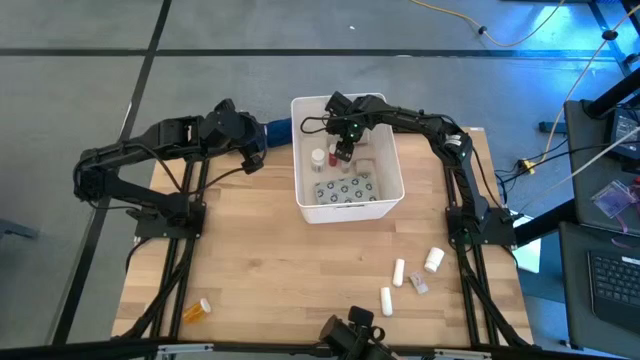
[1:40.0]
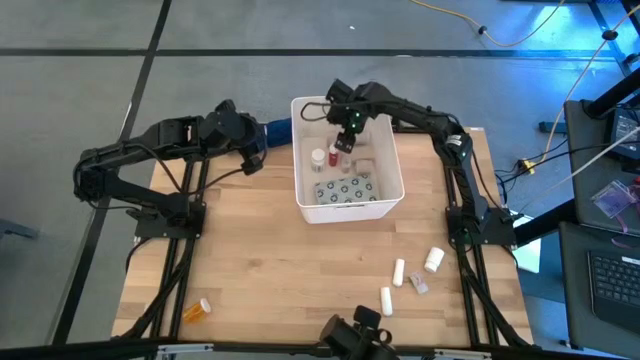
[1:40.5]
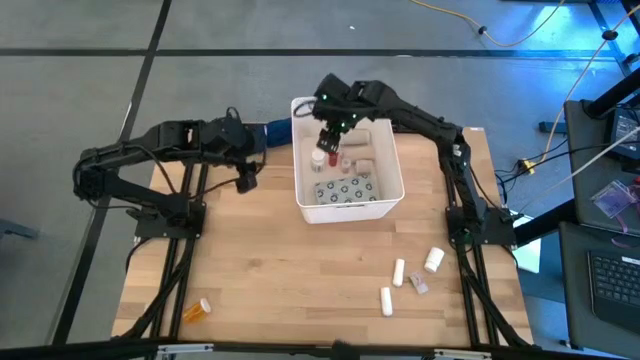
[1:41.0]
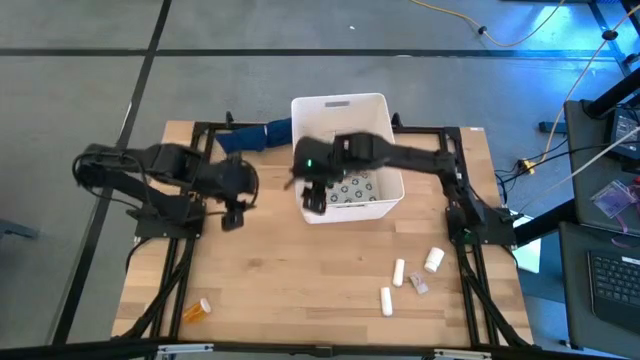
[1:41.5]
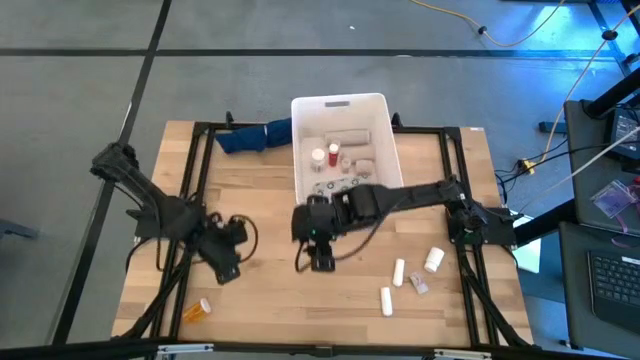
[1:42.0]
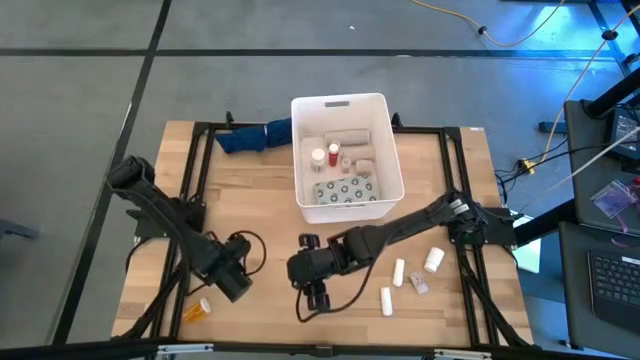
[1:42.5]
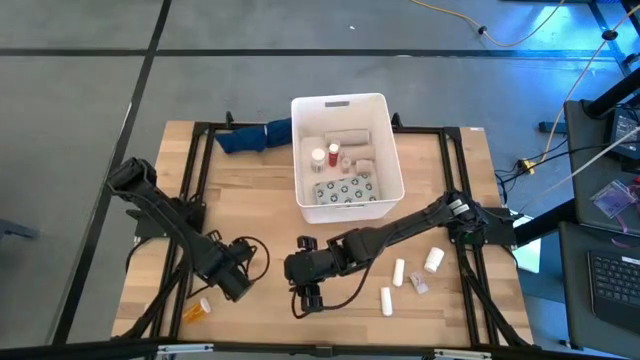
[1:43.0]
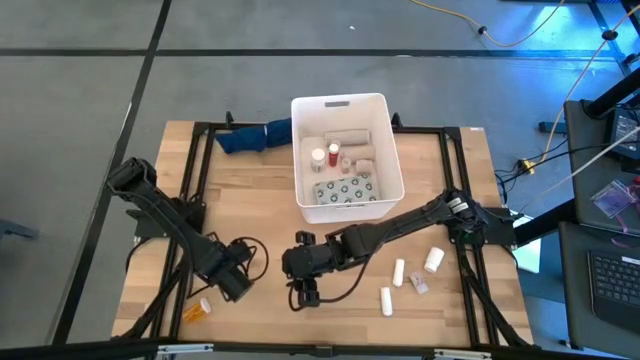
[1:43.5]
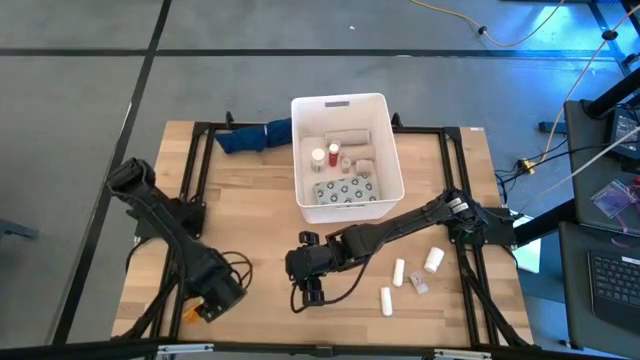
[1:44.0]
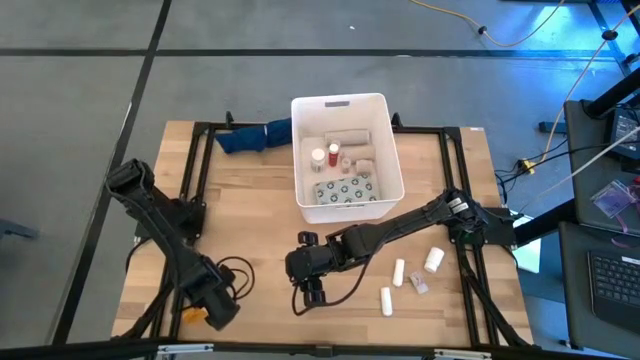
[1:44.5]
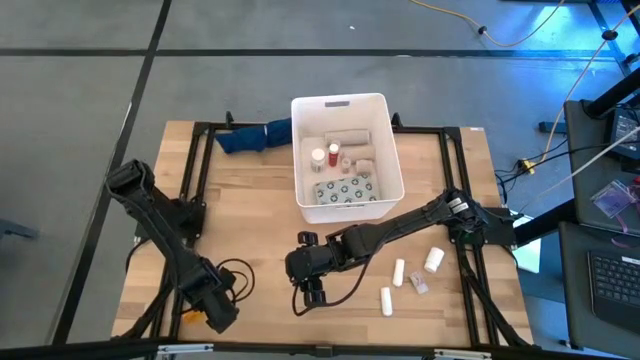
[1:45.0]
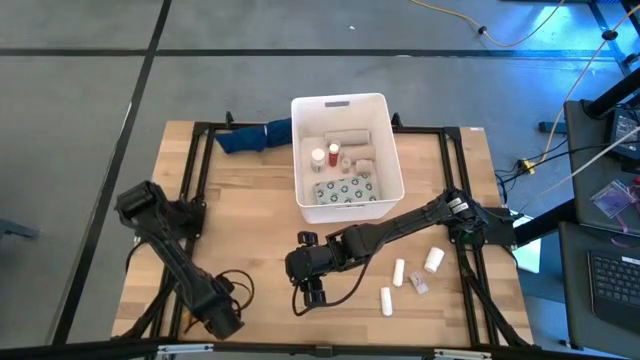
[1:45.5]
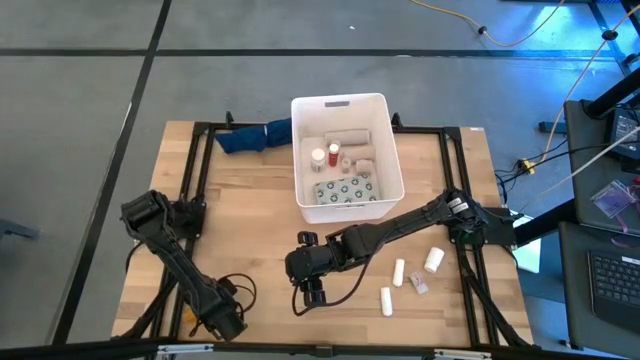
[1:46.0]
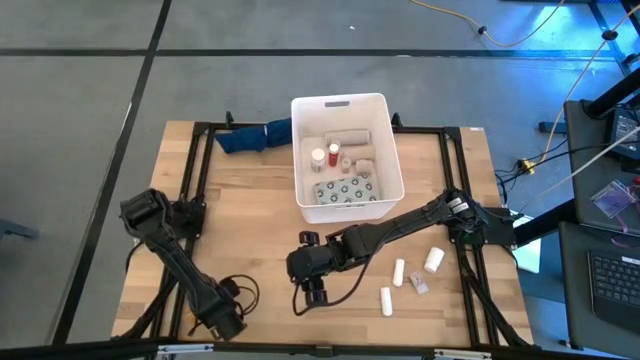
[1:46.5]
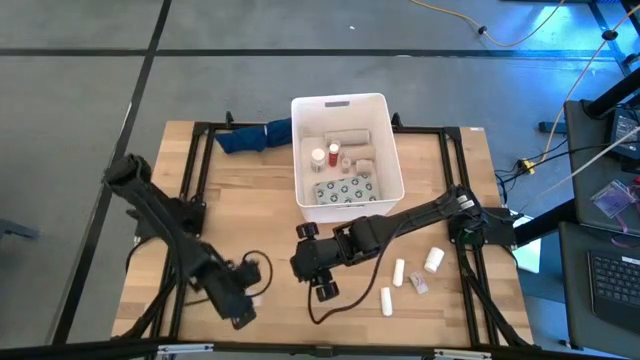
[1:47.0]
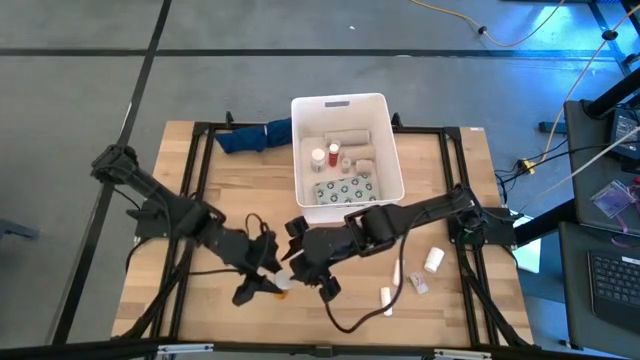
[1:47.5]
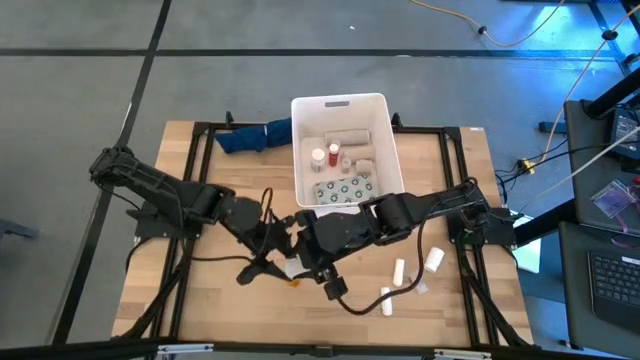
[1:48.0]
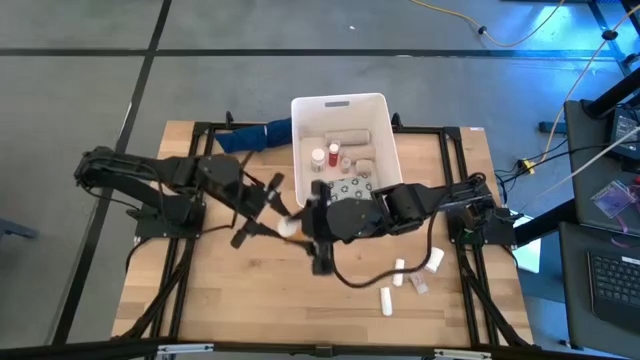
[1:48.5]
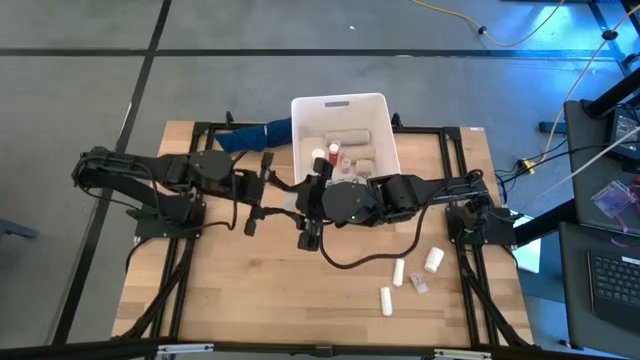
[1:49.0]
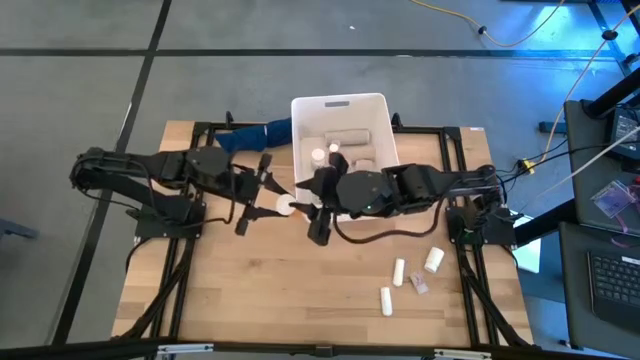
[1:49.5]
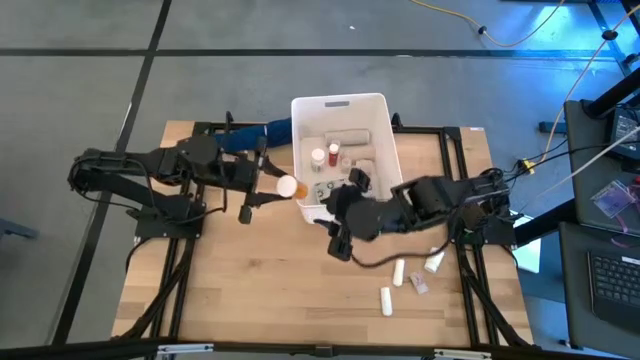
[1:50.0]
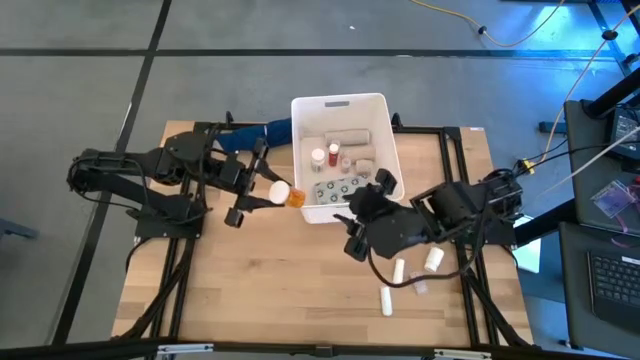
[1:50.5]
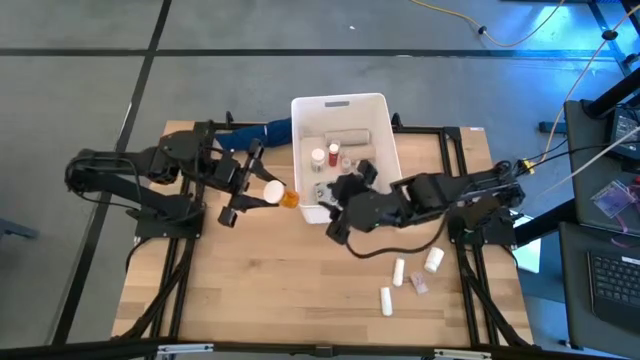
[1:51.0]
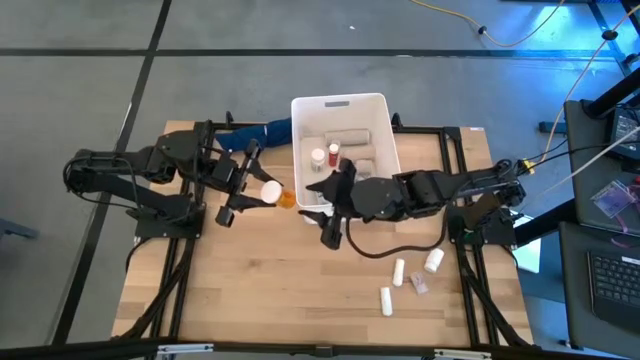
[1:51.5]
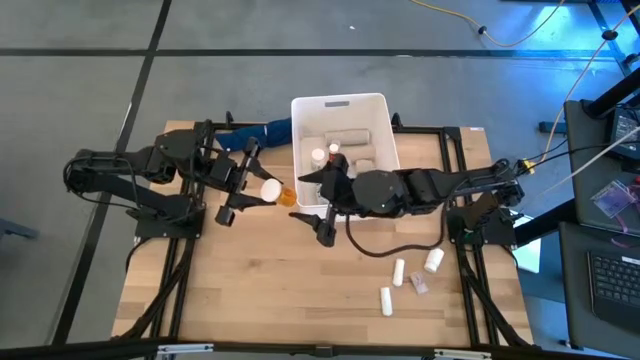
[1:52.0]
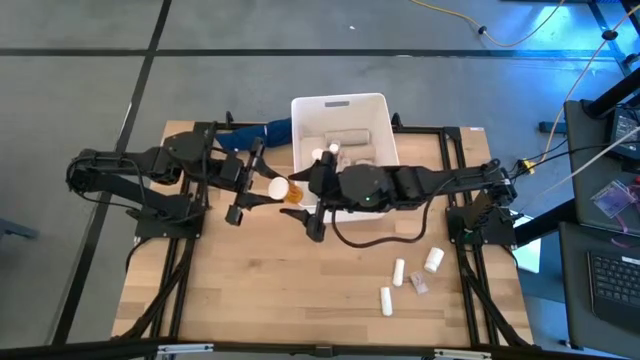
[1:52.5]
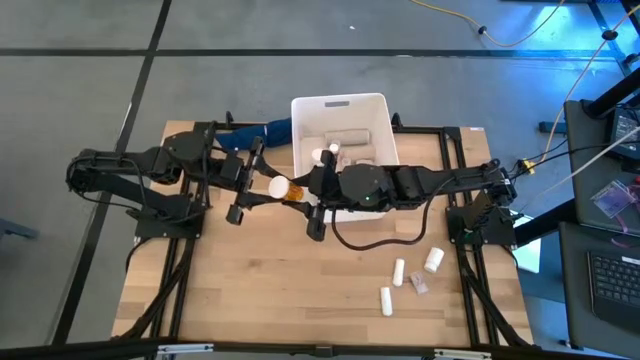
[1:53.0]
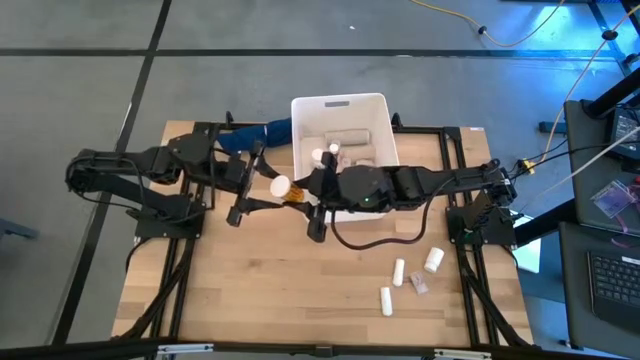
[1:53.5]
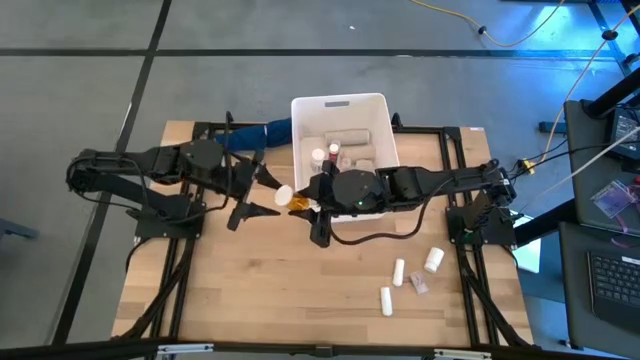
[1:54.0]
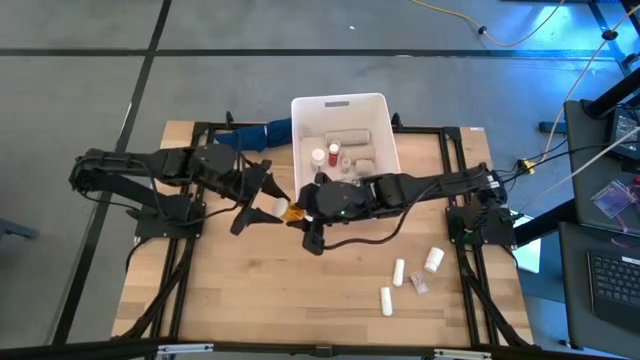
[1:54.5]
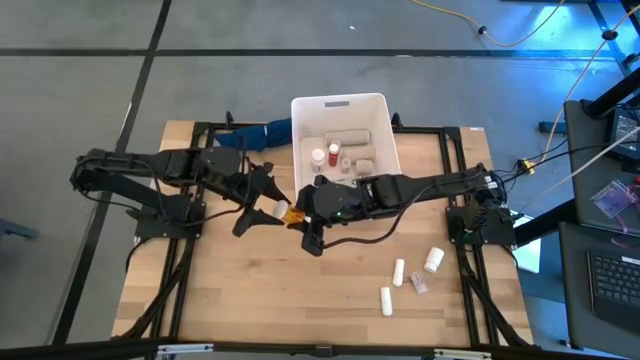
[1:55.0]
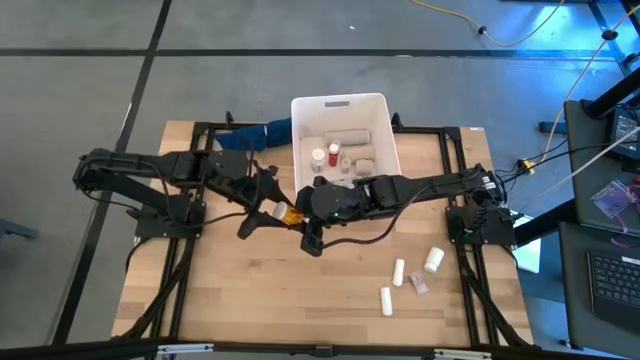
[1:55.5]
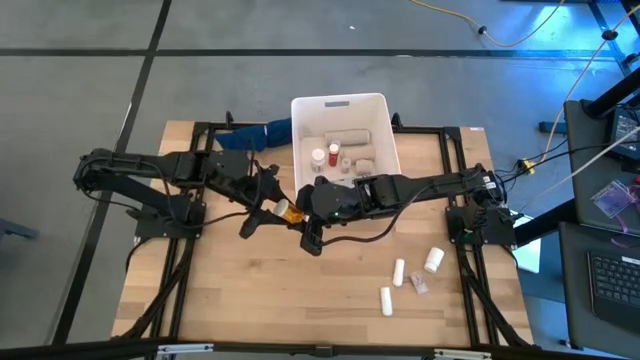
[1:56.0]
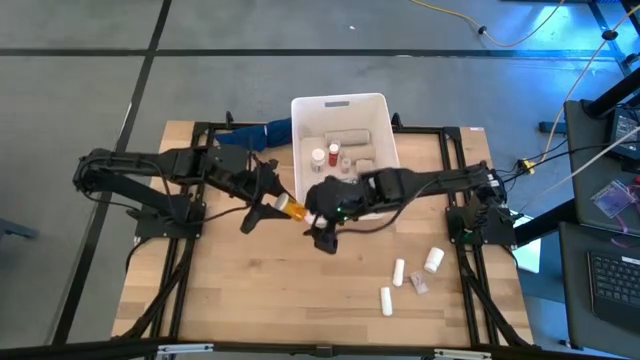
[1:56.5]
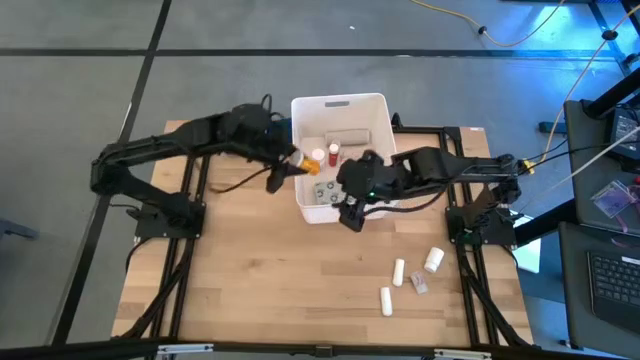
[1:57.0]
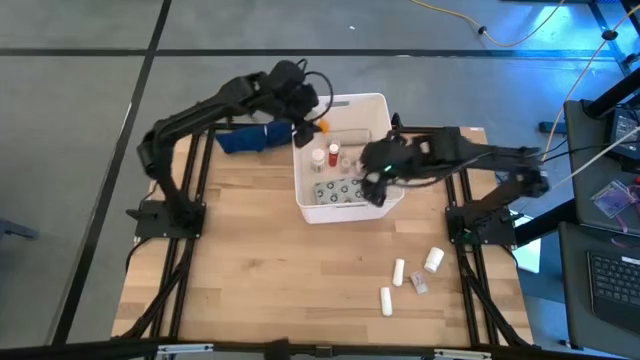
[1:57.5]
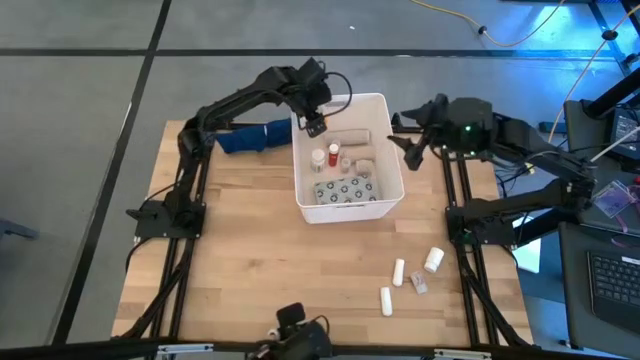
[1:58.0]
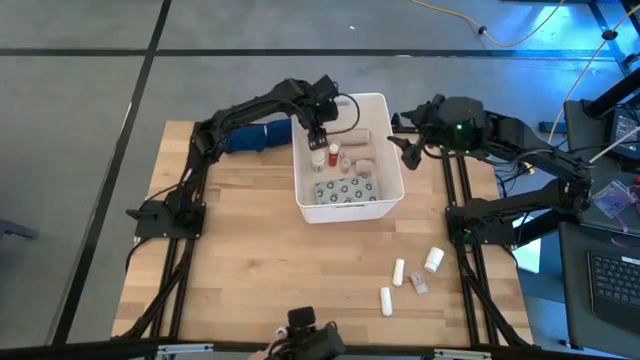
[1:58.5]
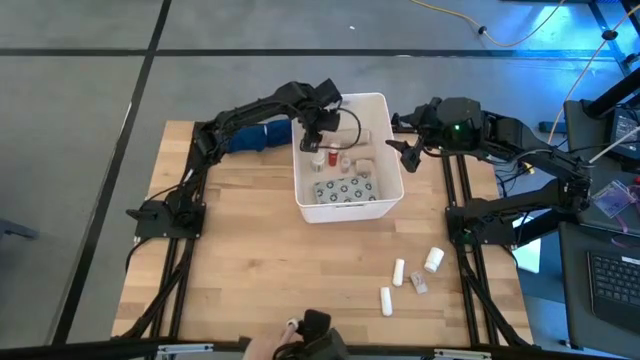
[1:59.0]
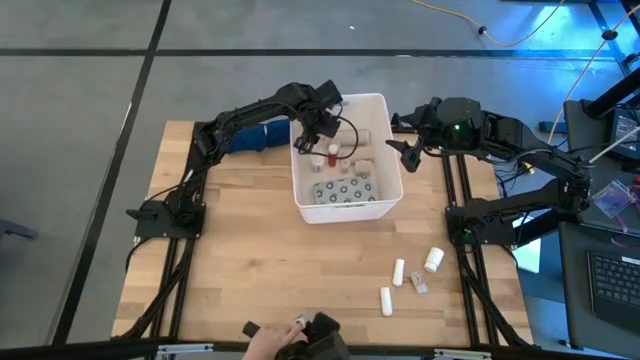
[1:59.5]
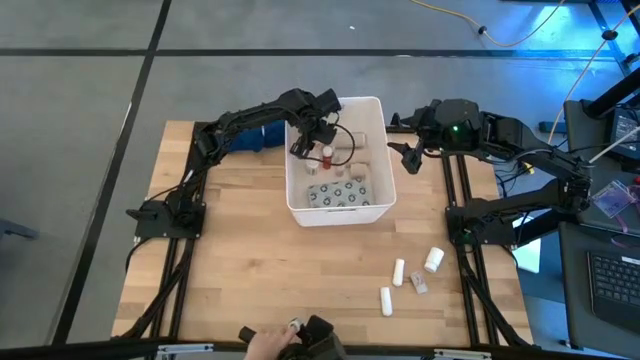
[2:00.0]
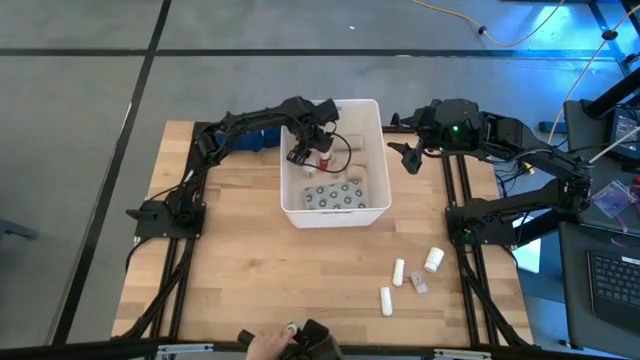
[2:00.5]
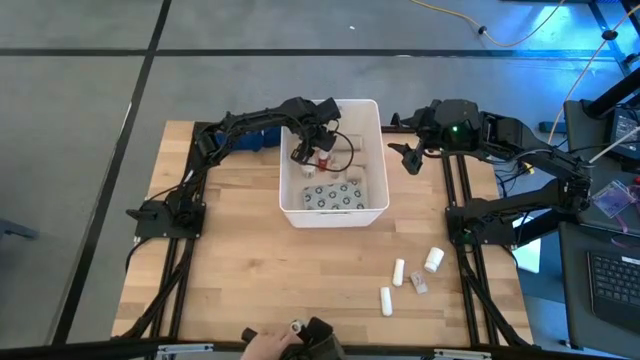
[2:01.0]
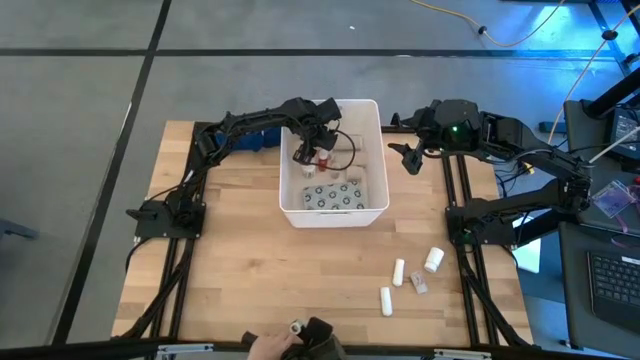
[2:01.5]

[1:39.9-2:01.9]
Task: Pick & place medical supplies in basket/bin
Put the orange medicine bottle into the bin
